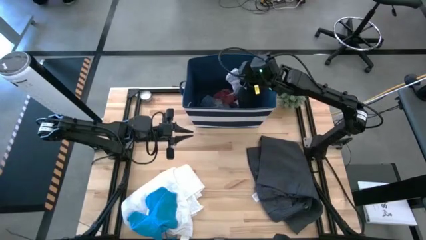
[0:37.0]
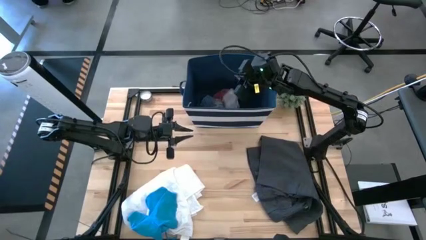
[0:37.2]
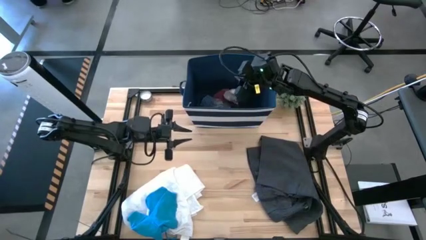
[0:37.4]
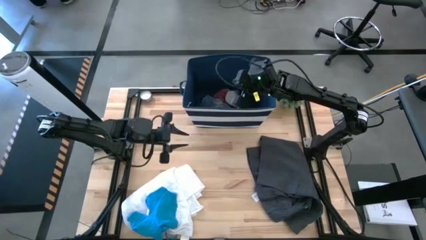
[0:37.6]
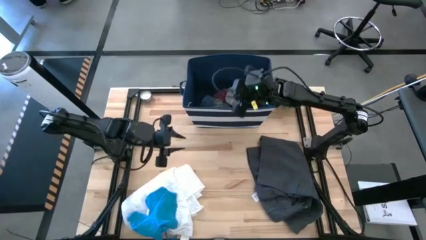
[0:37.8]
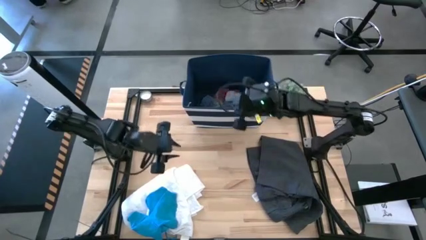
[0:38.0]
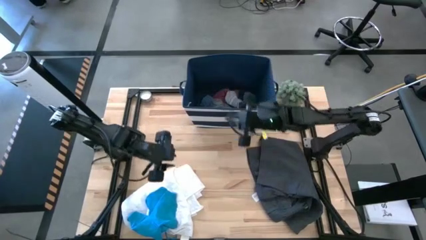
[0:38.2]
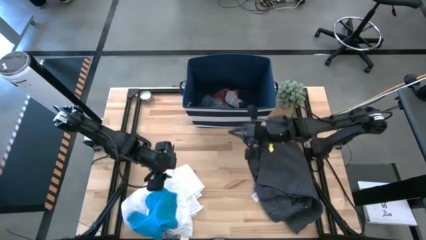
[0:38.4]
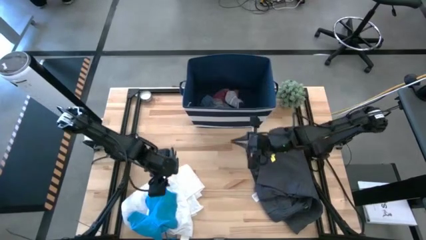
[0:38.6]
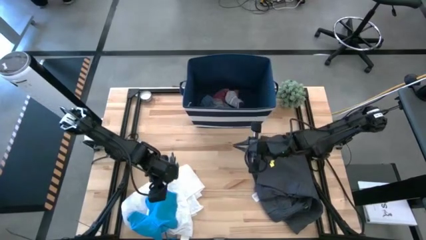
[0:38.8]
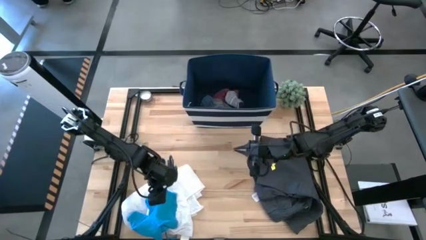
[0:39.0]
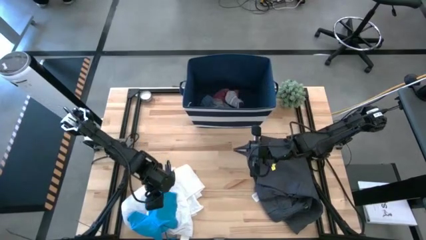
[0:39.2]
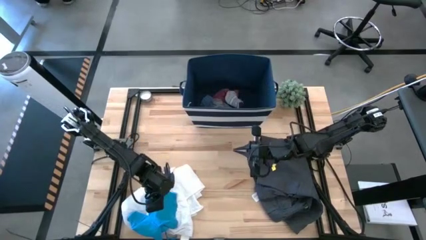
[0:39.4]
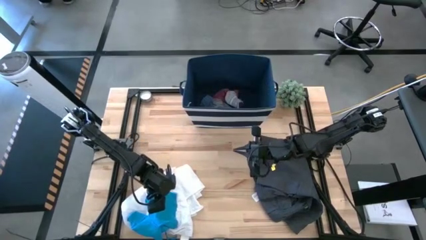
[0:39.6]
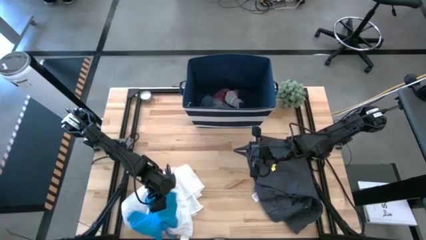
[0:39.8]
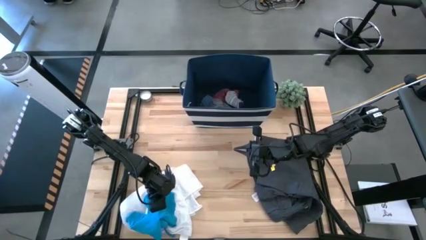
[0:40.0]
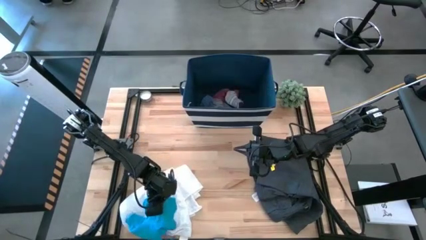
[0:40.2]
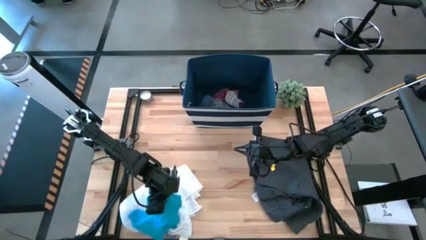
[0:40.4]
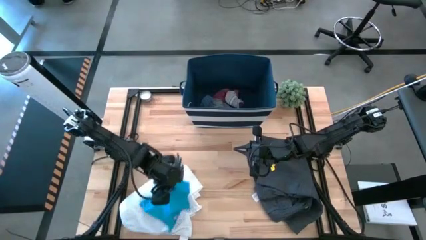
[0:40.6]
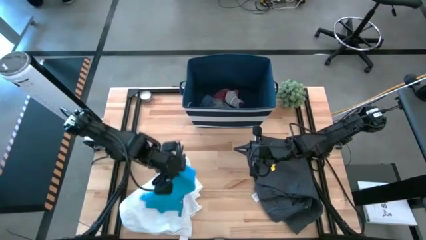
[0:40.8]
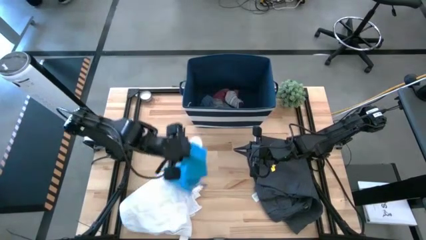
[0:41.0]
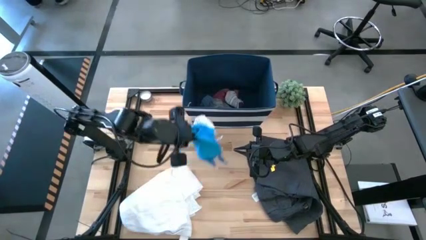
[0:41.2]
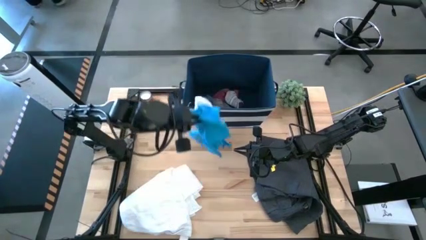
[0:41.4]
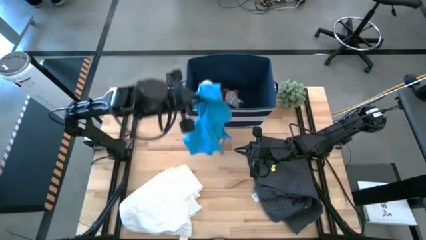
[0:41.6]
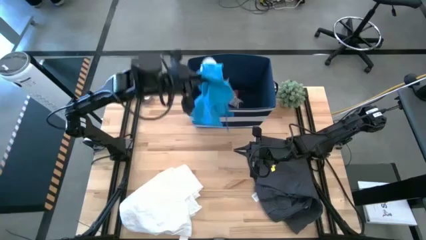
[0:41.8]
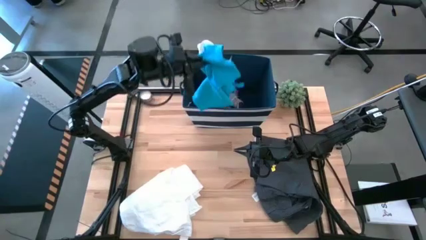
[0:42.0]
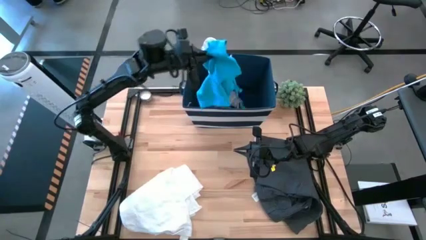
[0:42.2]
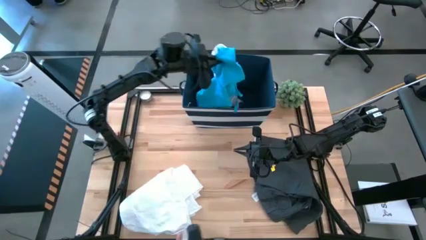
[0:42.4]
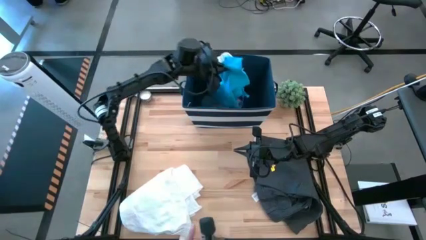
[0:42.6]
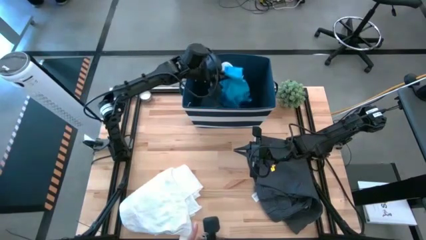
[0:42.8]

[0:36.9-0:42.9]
Task: Sort clothes
Put the blue underwear into the blue bin

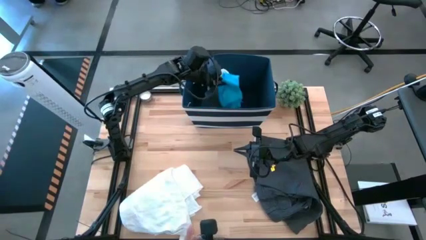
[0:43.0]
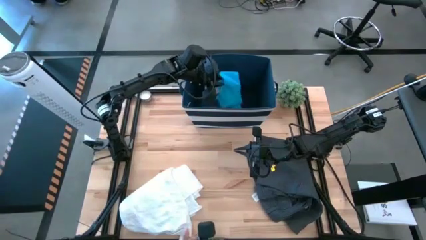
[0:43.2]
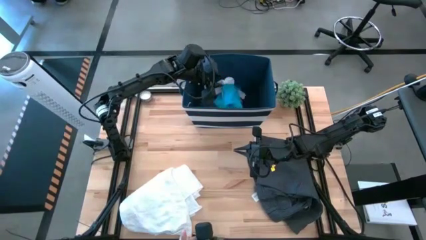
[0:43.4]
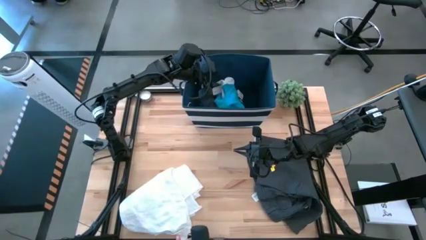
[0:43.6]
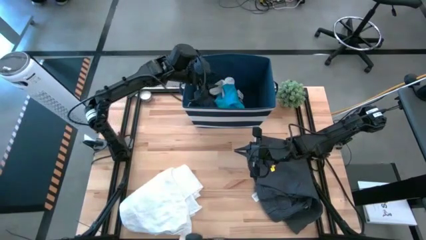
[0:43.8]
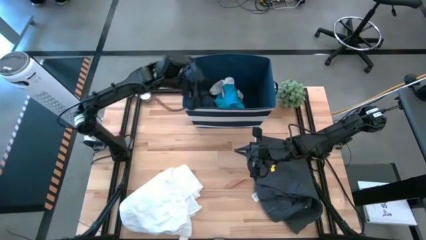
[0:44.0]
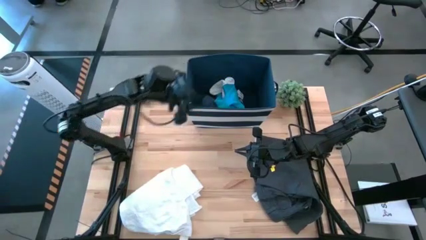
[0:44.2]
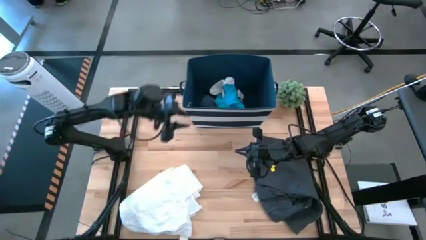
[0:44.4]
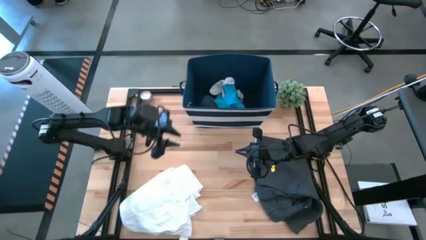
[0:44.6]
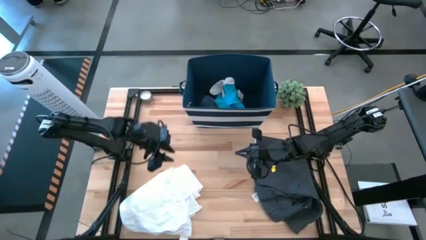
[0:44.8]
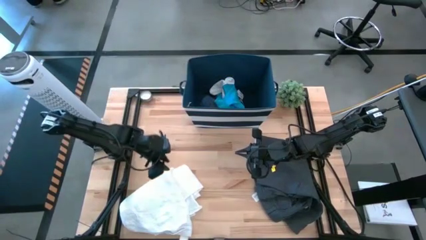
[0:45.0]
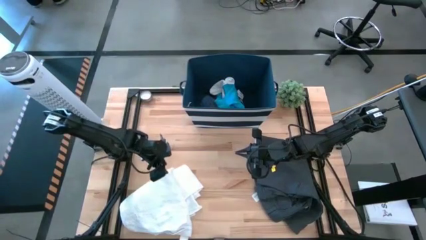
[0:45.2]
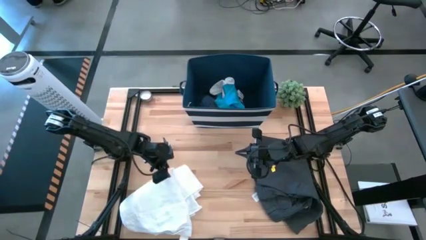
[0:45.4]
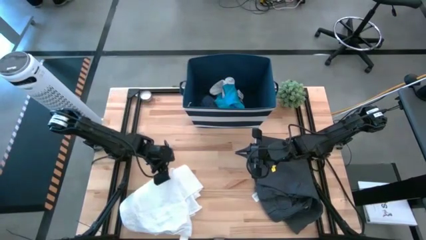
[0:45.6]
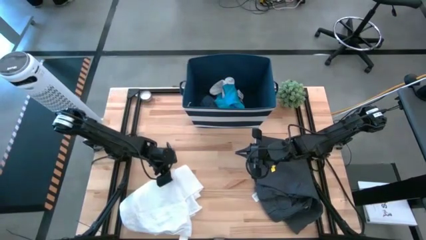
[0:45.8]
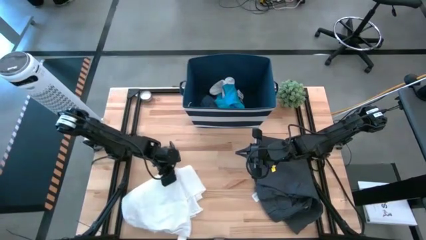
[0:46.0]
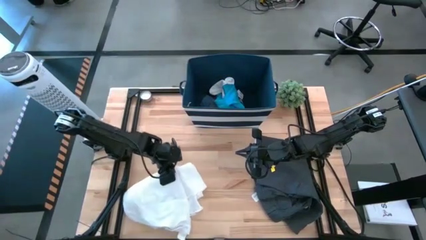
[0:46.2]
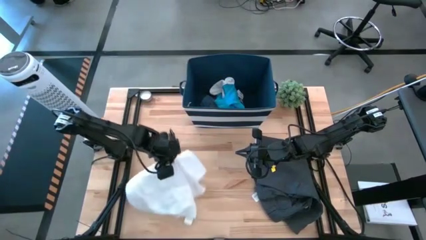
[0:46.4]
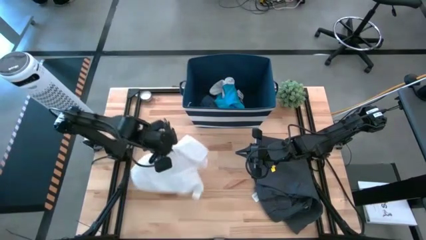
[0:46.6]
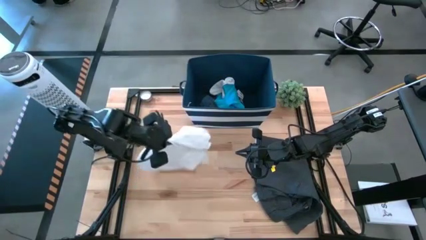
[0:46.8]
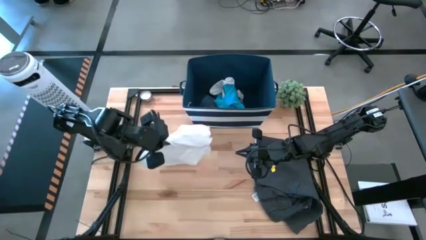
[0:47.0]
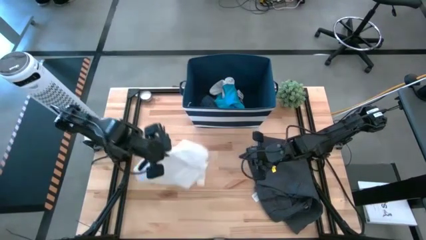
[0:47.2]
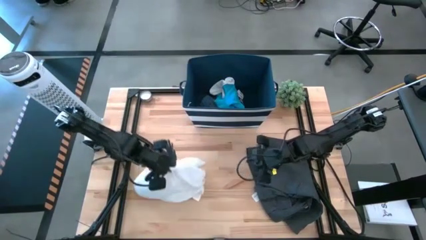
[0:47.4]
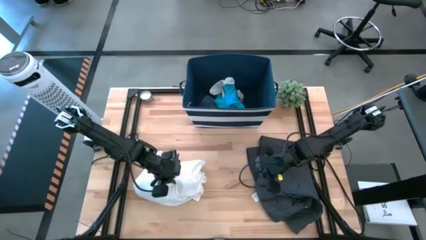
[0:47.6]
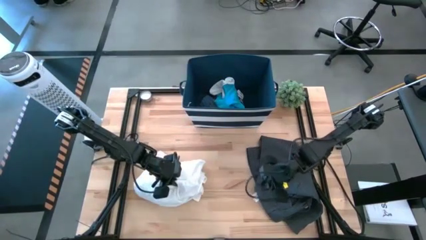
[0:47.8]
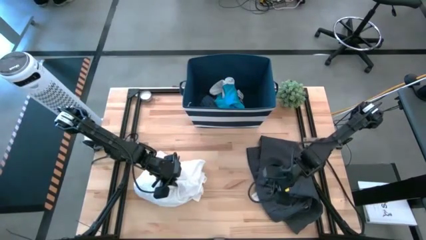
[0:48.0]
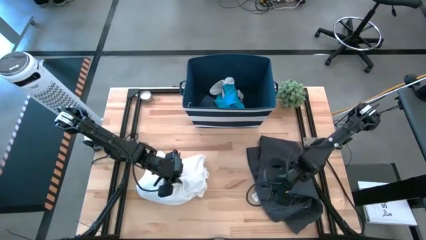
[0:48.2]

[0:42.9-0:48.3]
Put the white shirt into the blue bin

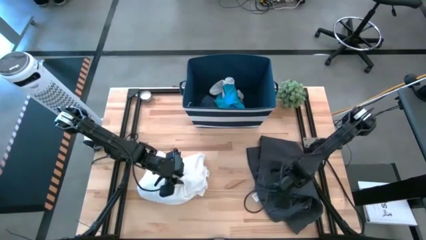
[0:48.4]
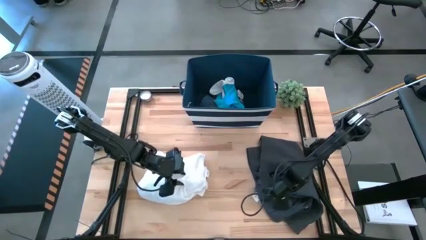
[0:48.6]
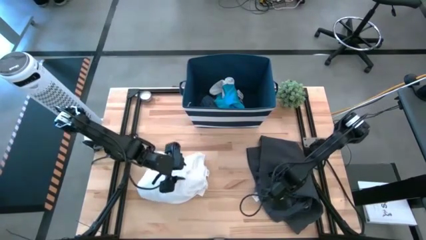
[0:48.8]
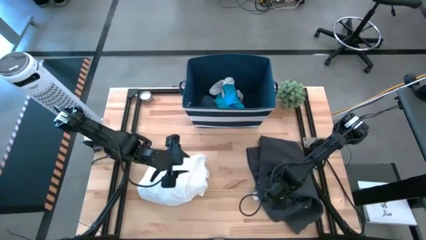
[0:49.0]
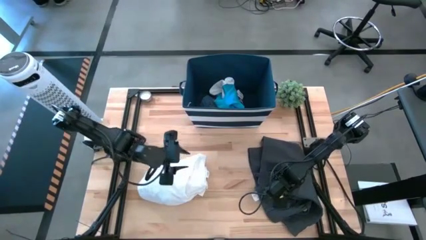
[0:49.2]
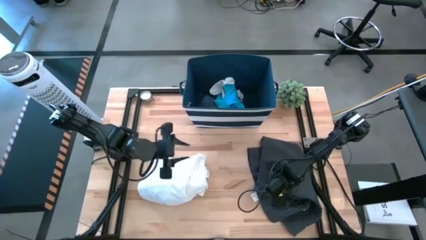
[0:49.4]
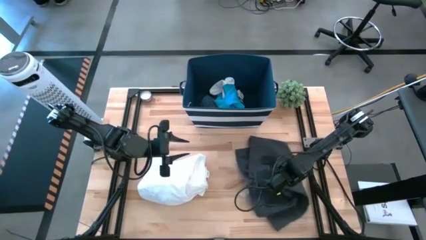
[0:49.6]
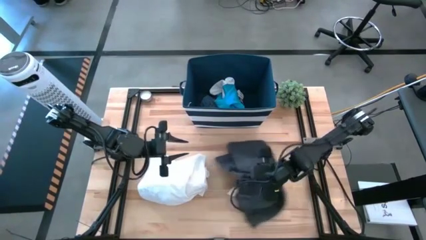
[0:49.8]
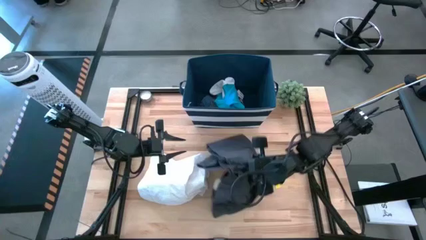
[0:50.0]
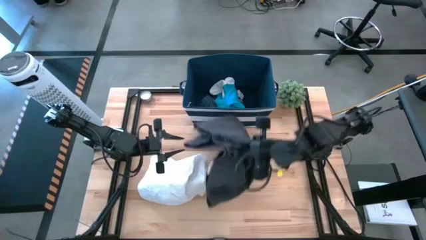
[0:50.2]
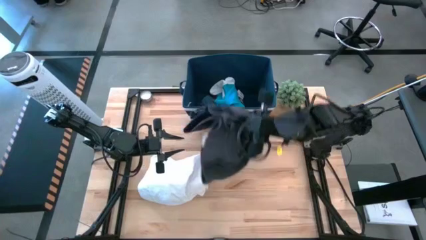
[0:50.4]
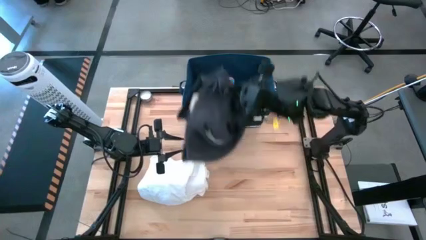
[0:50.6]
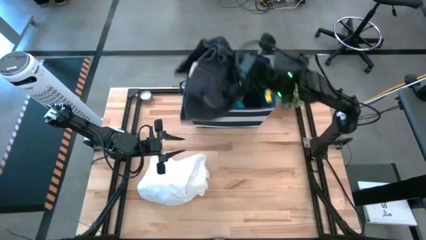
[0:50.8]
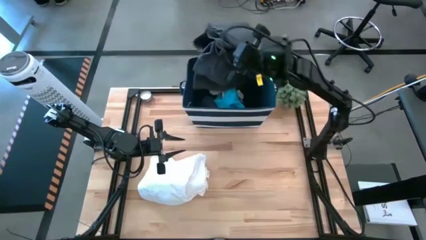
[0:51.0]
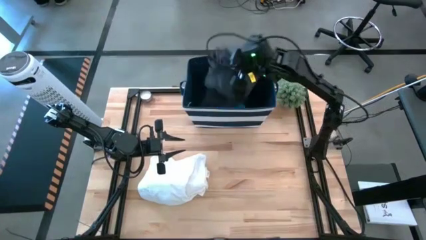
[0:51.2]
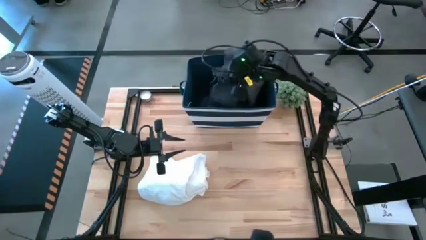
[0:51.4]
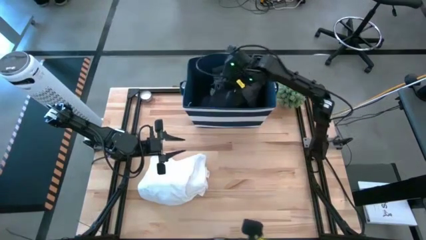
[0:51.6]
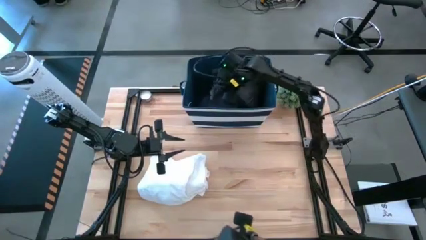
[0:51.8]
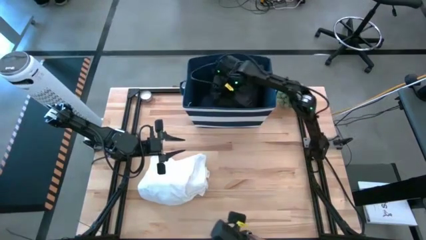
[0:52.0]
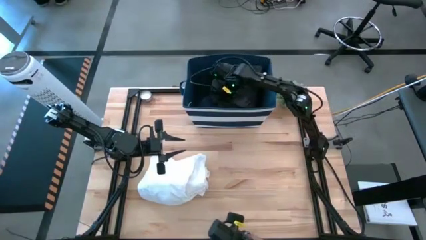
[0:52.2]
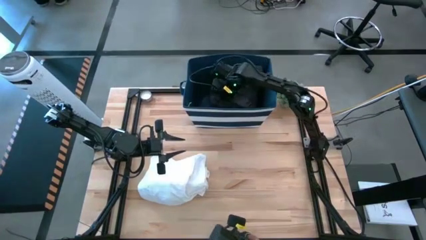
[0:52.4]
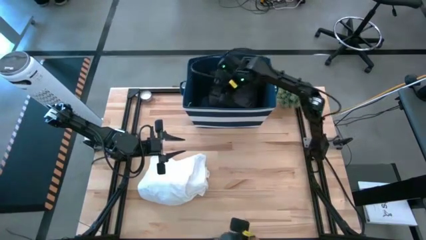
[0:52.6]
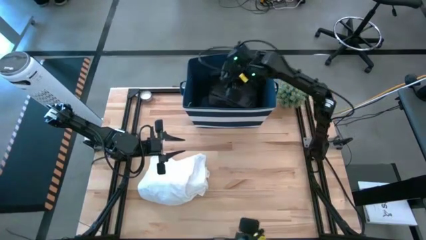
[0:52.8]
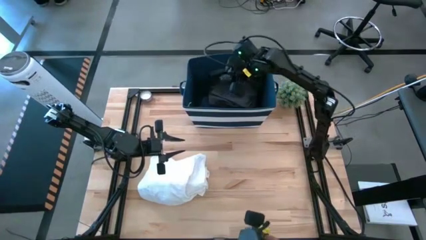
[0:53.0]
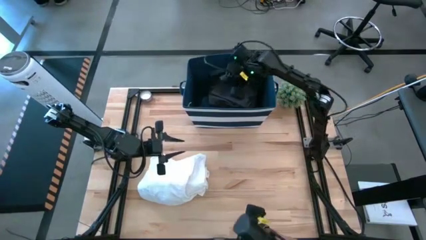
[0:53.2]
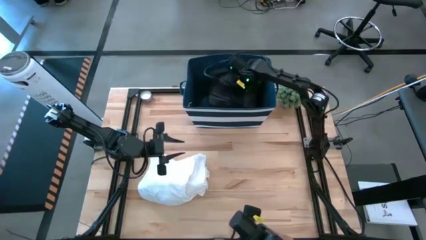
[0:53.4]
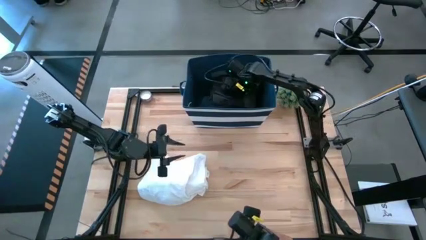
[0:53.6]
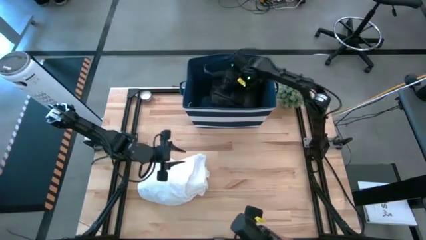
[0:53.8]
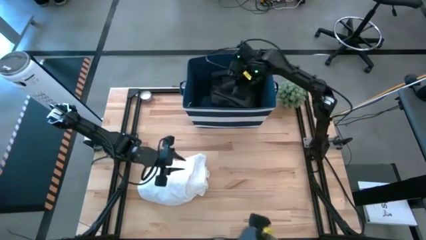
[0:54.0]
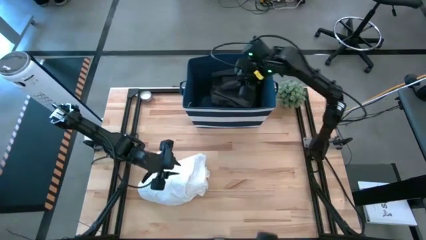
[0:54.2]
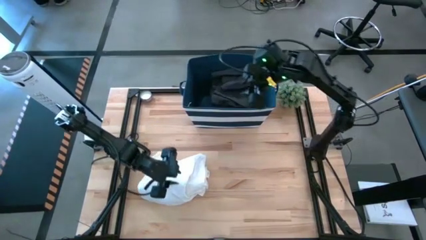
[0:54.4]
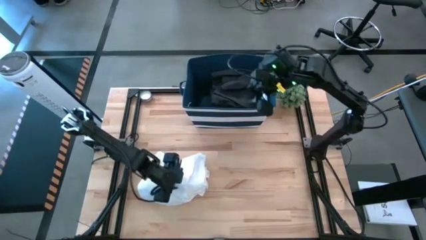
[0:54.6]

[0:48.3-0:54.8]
Put the gray shorts into the blue bin
